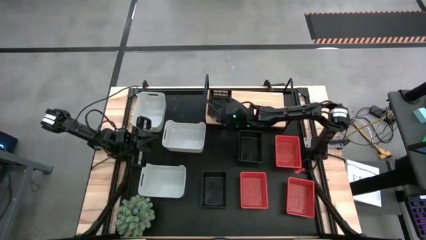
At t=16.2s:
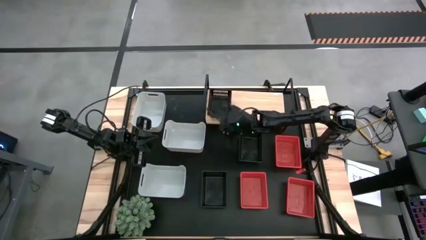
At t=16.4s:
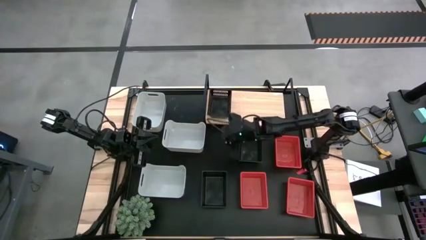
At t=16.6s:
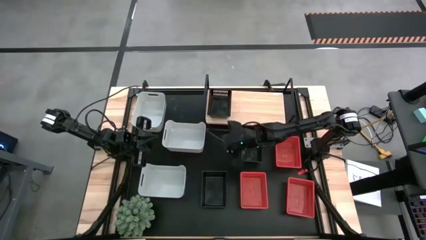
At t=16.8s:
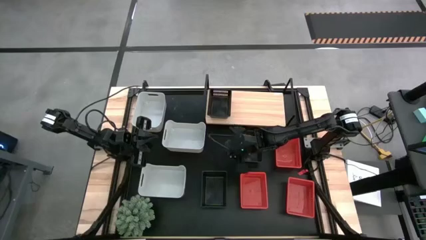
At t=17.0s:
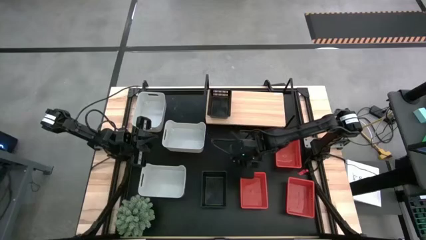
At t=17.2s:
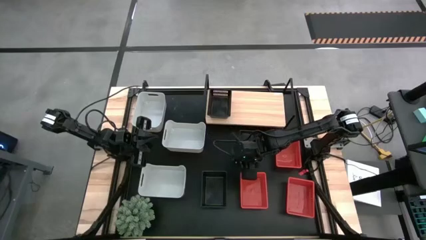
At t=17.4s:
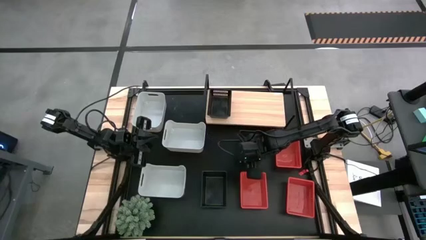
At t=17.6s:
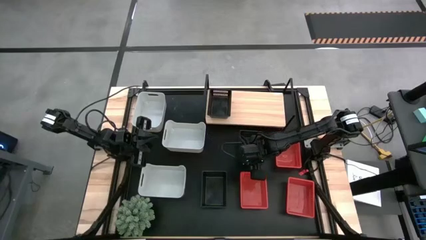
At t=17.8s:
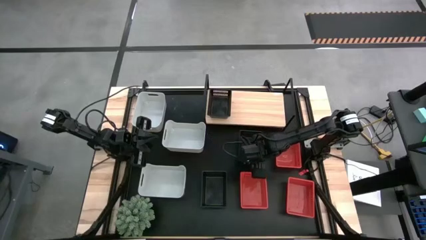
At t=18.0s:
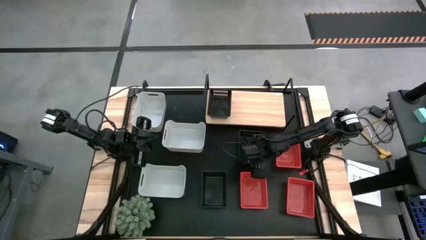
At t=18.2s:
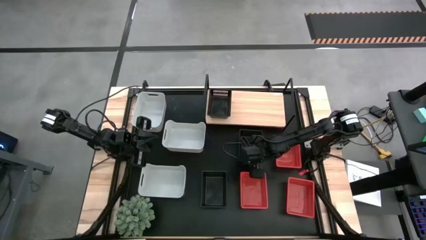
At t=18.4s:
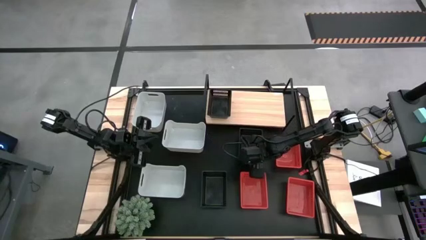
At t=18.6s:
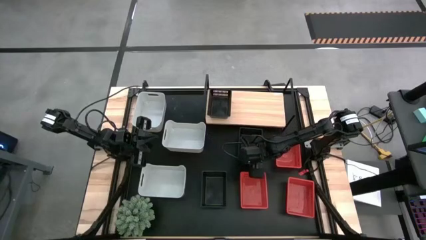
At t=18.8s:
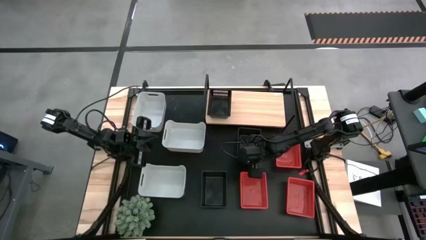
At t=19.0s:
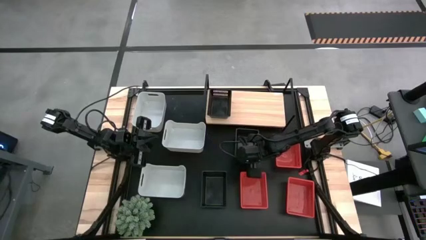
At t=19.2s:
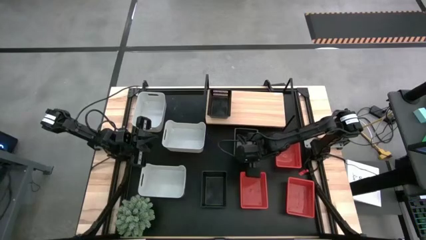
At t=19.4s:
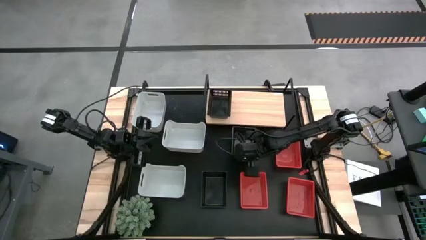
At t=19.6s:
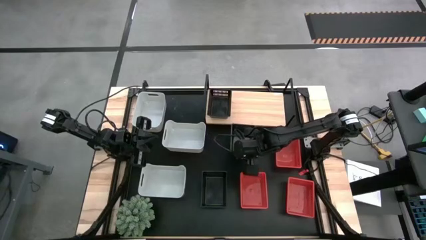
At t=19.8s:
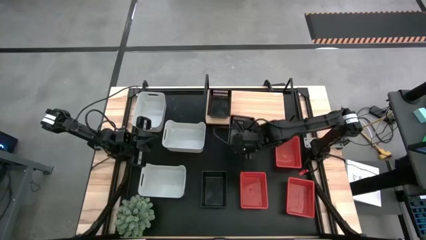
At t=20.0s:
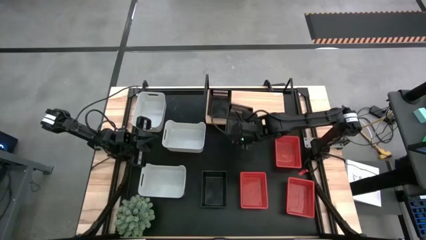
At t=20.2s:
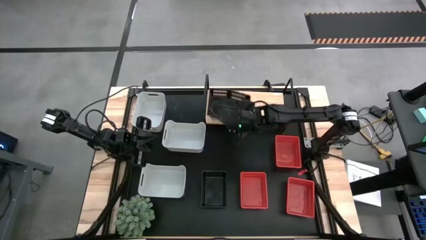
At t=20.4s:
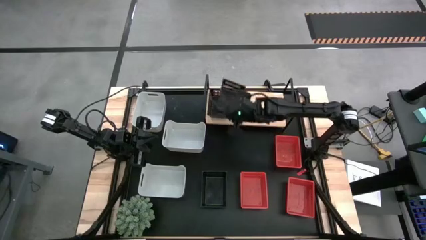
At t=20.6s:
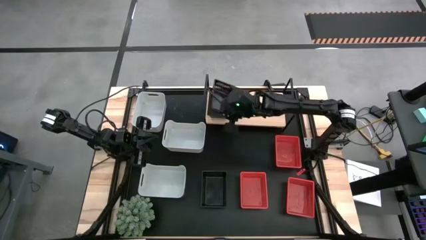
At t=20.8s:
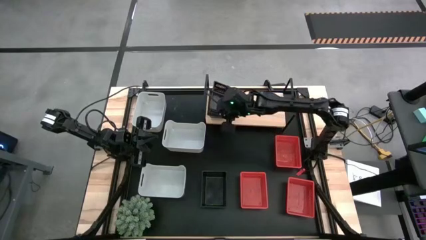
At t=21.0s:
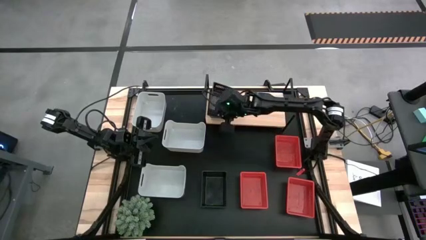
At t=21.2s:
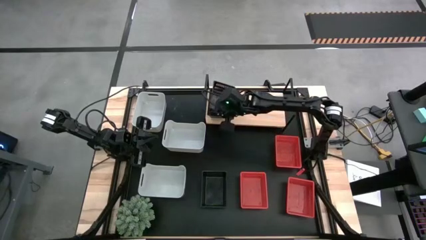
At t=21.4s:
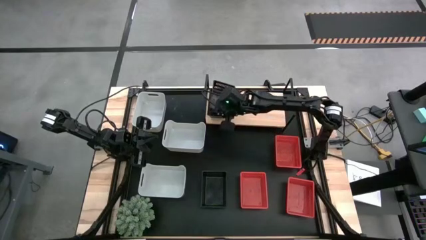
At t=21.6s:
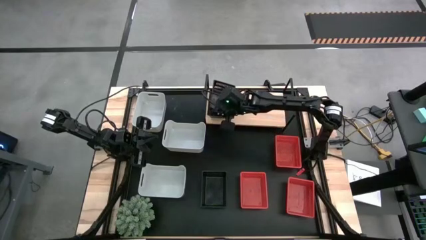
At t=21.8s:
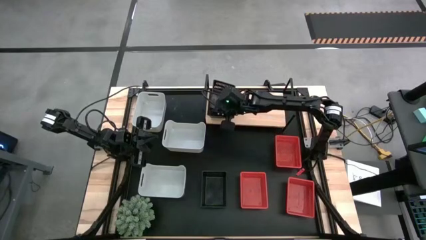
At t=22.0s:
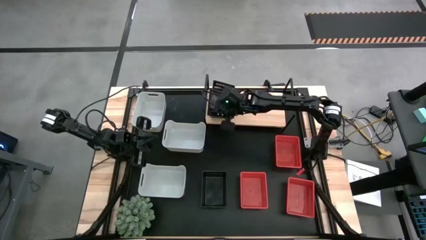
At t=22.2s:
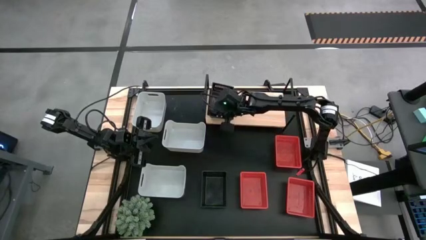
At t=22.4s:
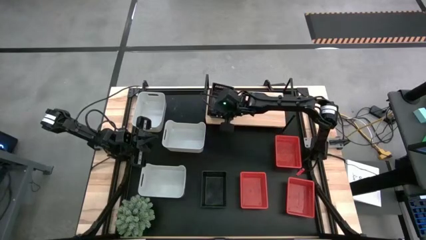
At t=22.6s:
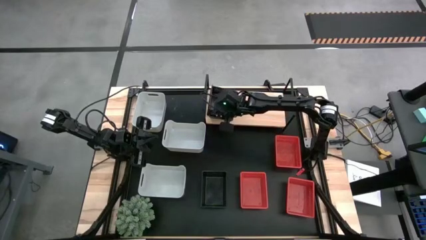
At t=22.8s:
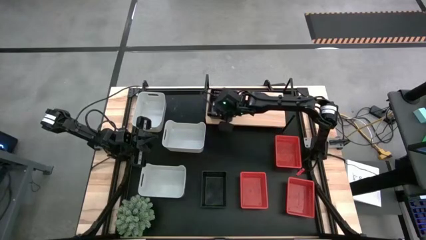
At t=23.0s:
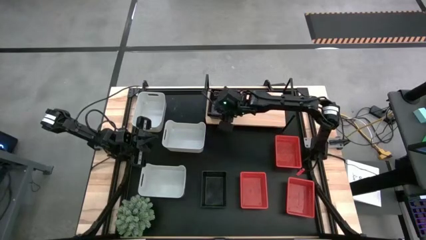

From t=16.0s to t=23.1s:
Task: Stack baskets on shelf by color
Stack the top black bin into the top of the black bin on the shelf

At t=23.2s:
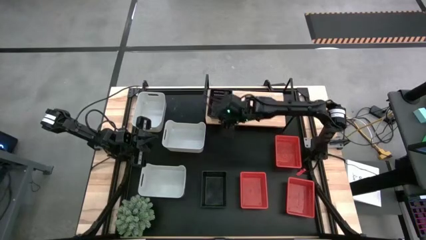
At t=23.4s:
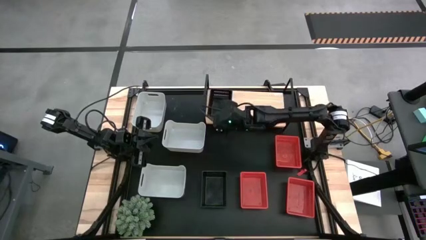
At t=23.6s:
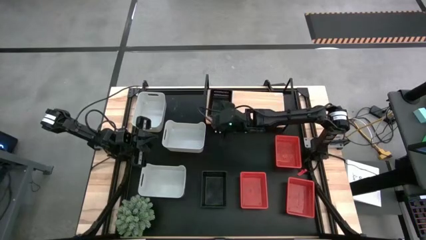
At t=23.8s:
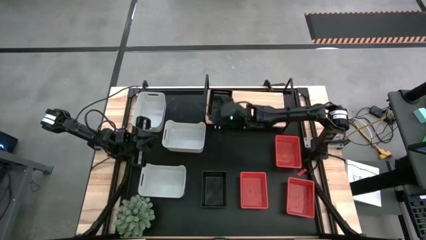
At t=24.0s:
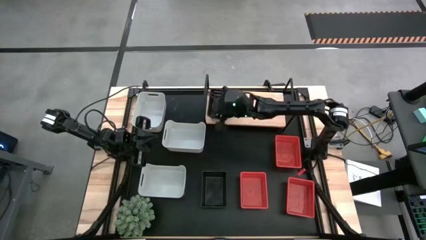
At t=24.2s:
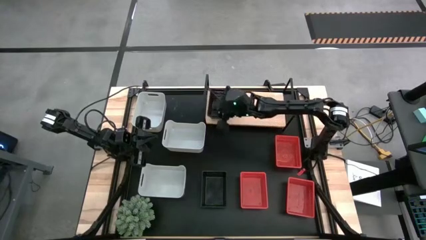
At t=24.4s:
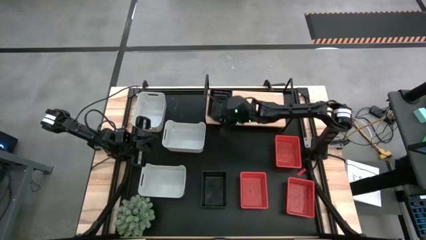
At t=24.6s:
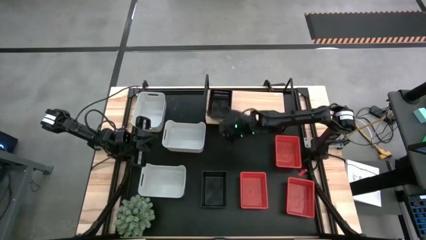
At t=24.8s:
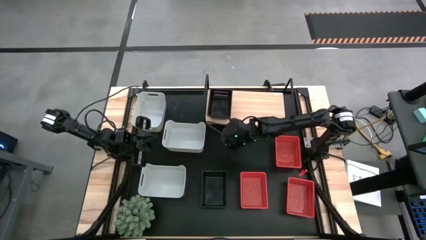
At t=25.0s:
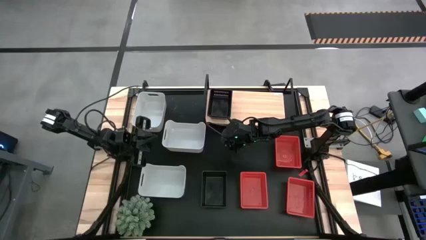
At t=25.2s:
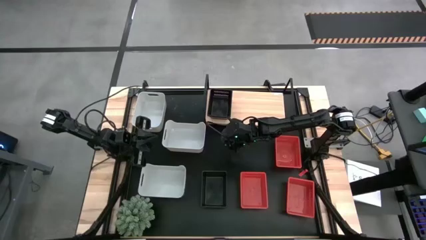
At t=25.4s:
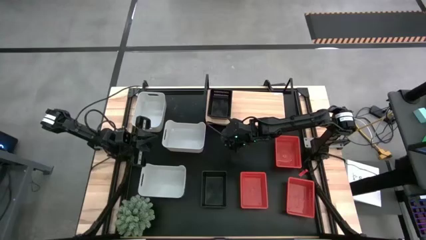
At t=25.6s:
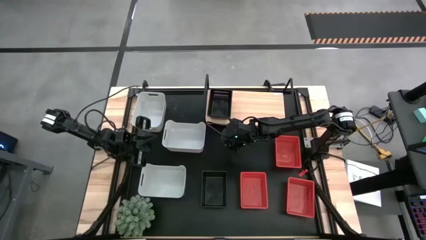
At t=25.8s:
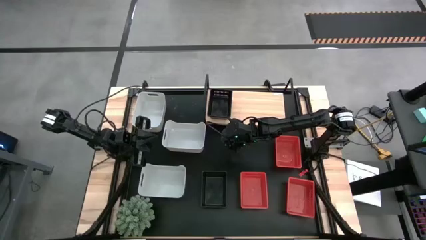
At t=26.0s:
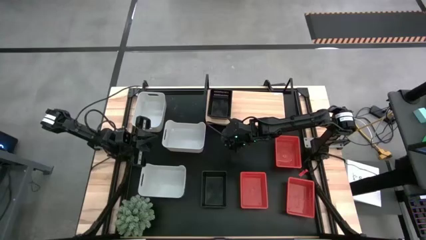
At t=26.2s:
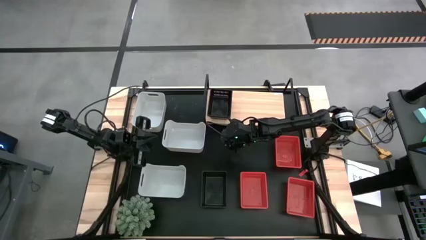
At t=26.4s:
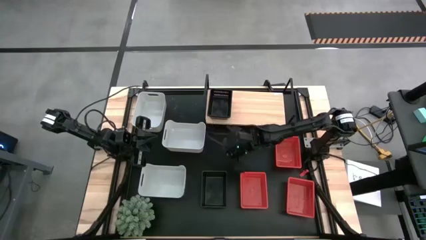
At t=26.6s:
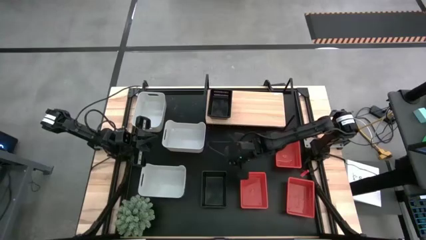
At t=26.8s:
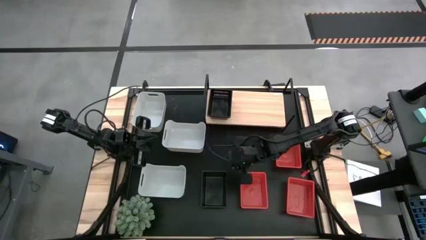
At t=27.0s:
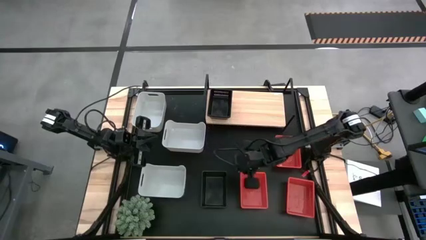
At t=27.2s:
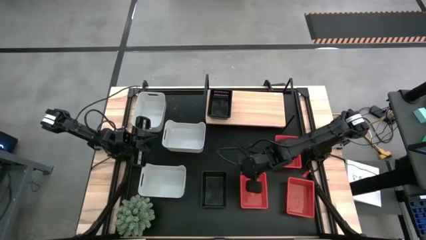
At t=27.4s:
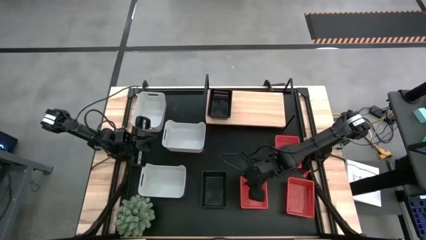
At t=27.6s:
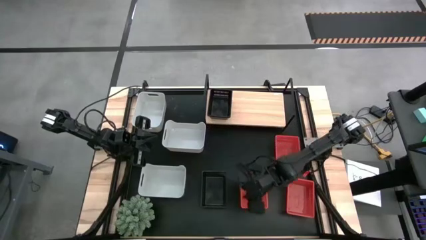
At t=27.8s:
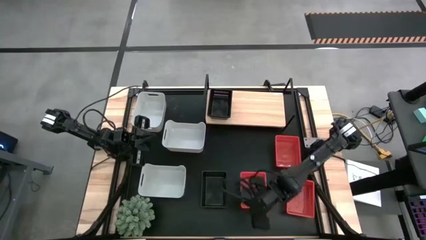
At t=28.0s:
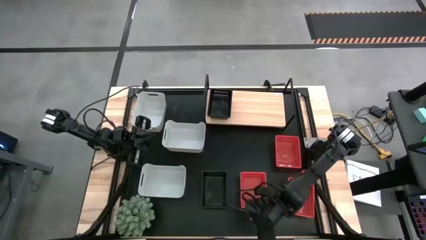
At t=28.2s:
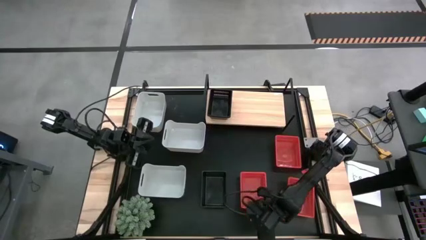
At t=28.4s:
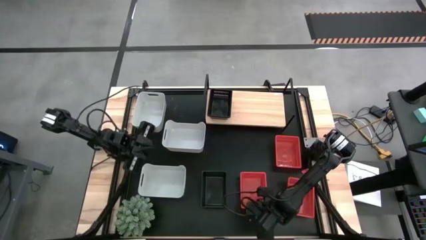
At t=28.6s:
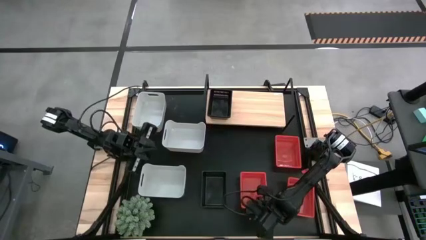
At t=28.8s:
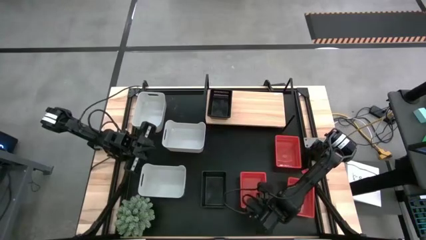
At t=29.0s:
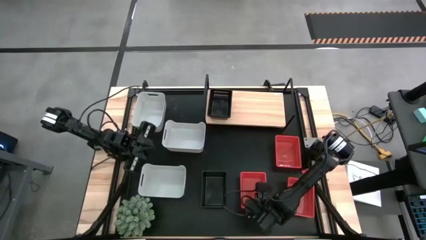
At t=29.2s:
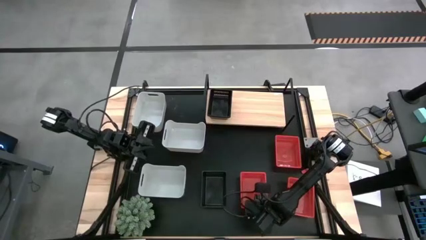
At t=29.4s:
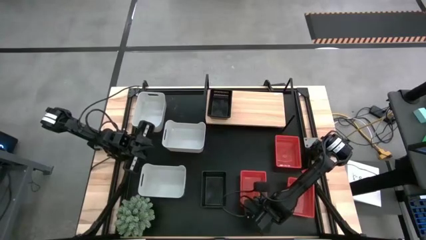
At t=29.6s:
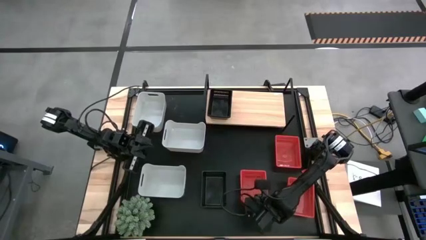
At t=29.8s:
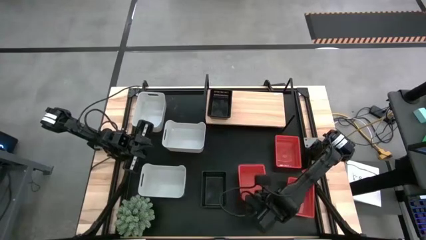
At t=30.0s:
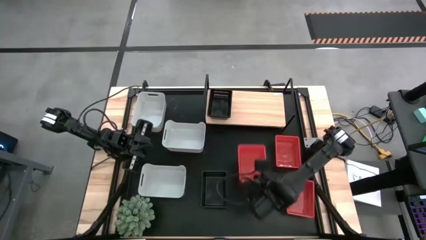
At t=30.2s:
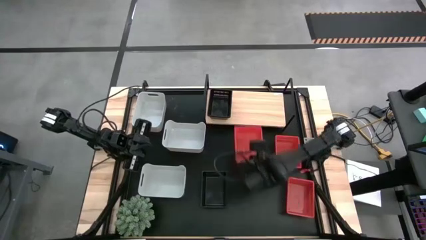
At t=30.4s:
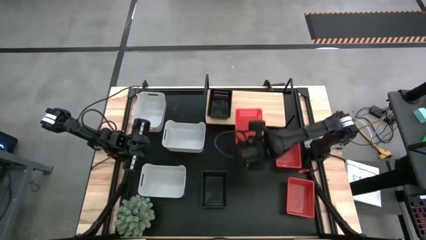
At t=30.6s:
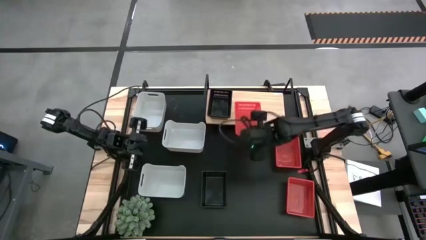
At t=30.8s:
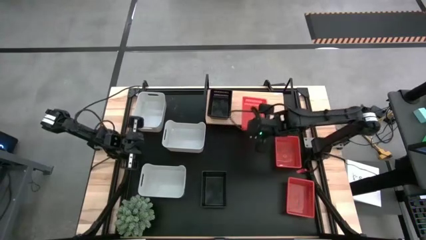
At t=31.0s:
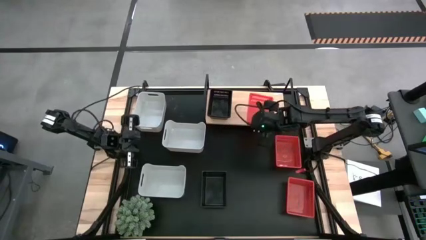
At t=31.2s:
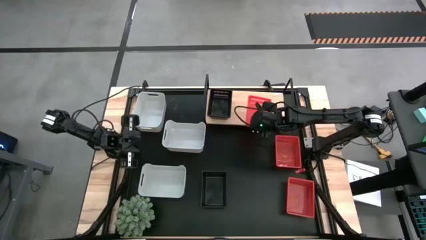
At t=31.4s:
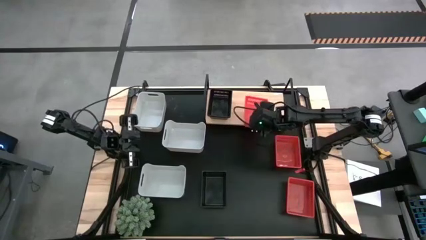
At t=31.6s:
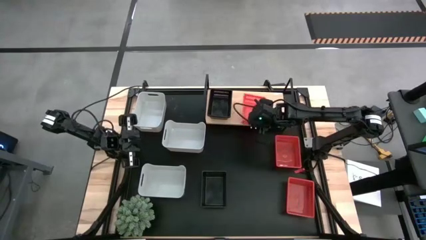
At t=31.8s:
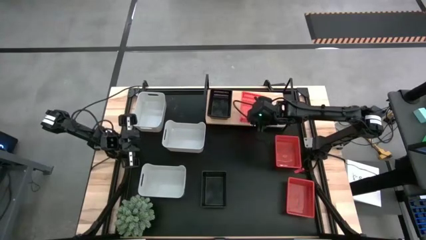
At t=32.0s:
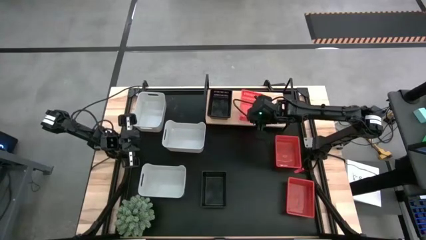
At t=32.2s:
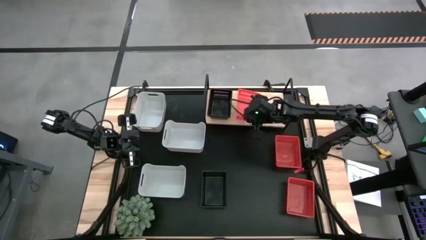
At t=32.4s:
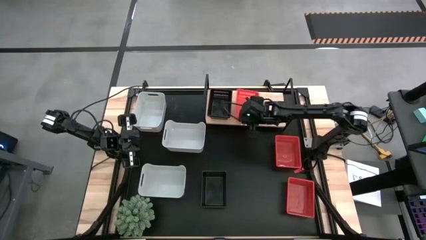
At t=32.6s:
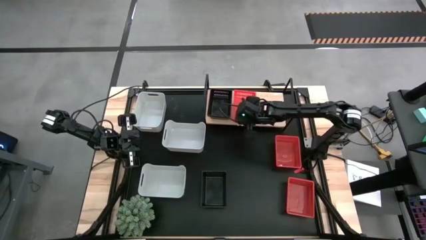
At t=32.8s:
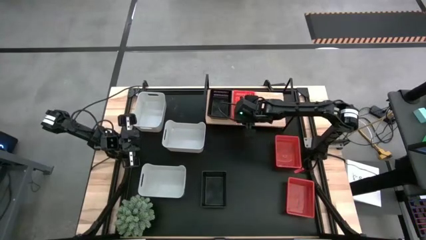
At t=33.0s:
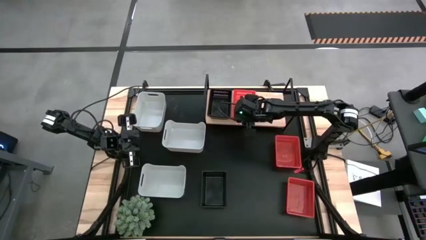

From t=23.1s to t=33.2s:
Put the bottom left red bin on the shelf
